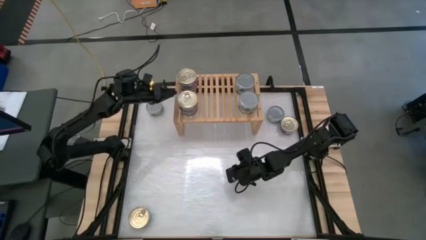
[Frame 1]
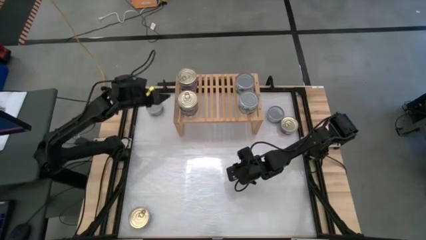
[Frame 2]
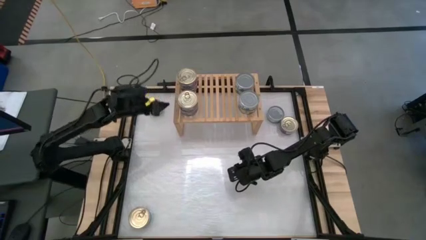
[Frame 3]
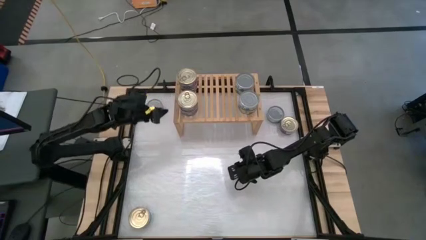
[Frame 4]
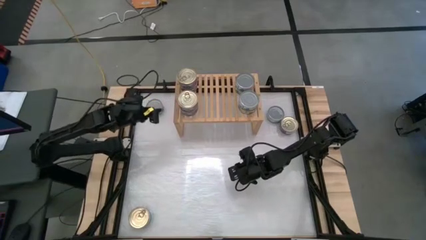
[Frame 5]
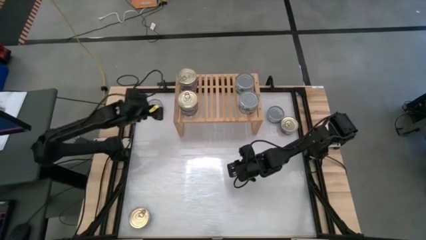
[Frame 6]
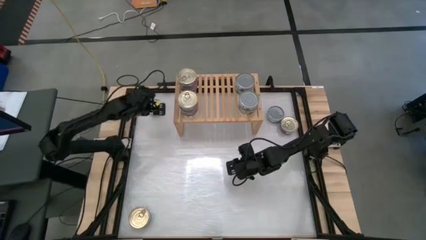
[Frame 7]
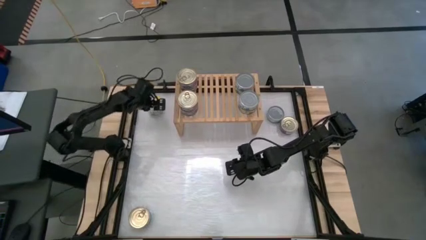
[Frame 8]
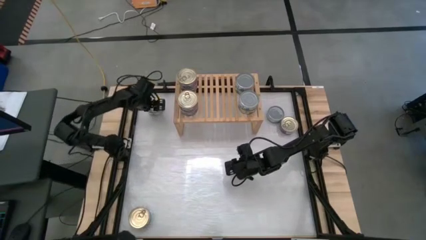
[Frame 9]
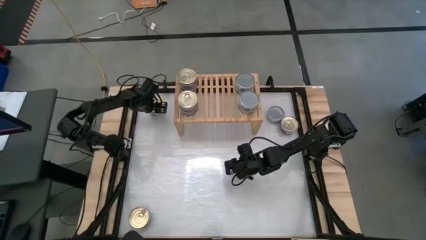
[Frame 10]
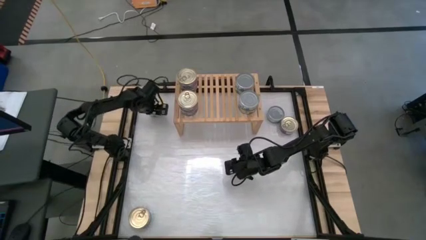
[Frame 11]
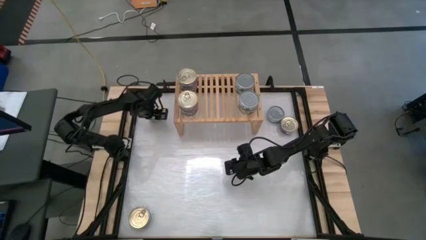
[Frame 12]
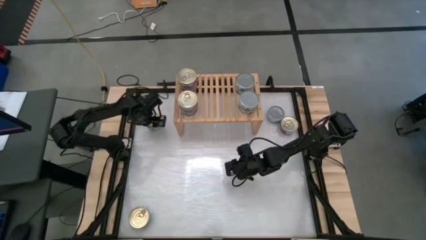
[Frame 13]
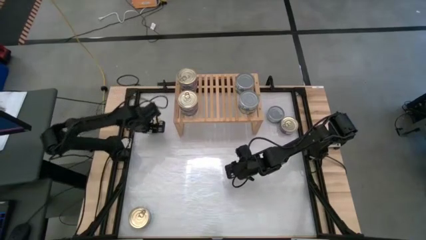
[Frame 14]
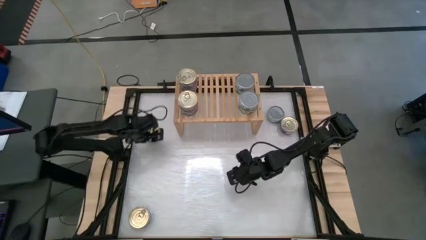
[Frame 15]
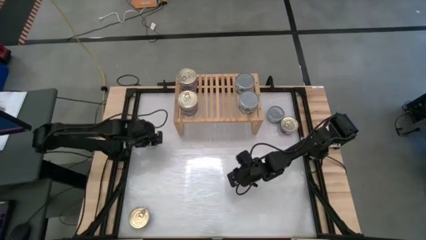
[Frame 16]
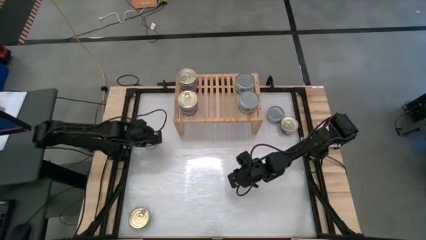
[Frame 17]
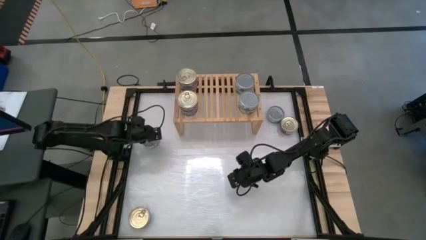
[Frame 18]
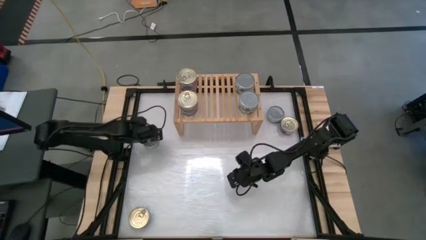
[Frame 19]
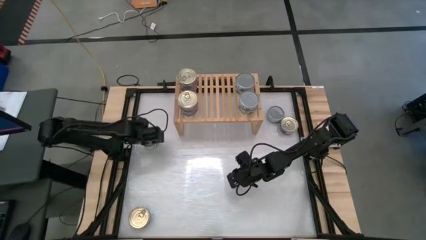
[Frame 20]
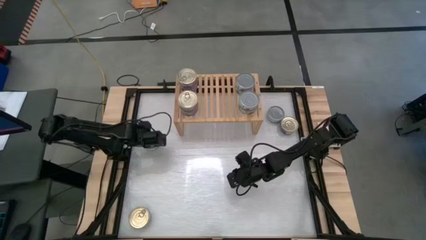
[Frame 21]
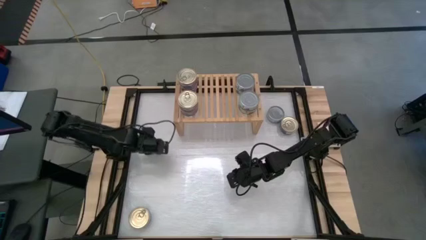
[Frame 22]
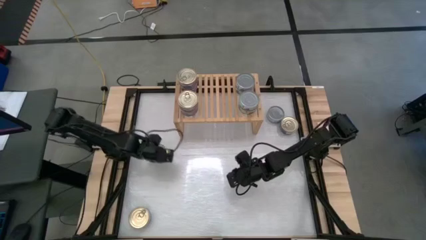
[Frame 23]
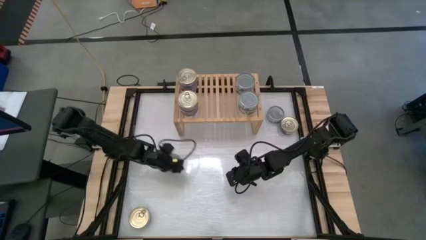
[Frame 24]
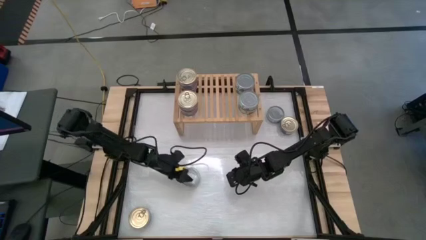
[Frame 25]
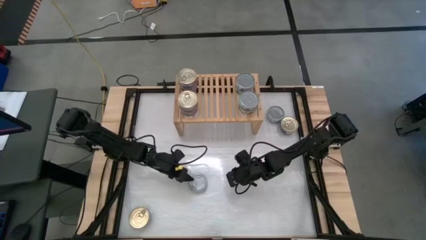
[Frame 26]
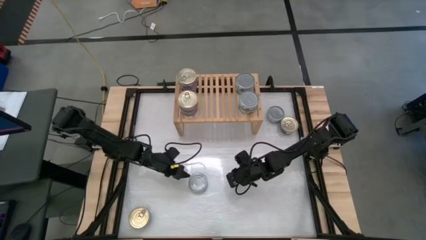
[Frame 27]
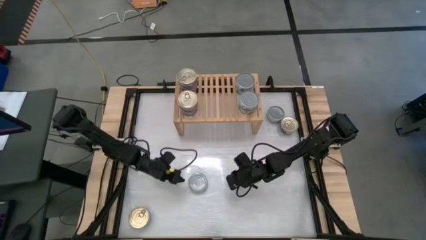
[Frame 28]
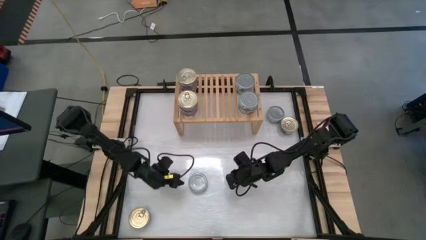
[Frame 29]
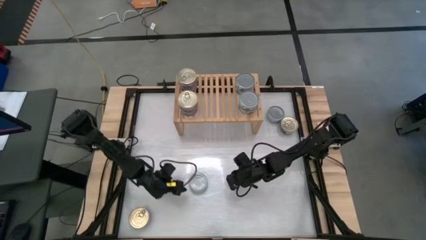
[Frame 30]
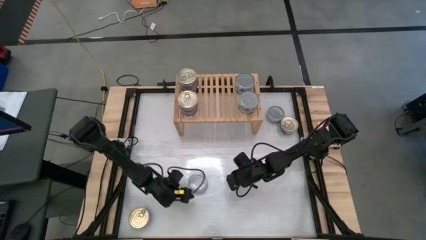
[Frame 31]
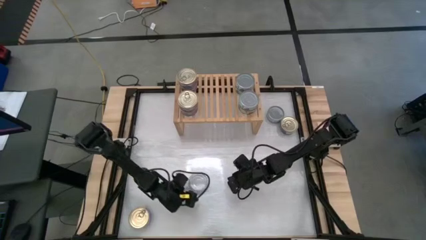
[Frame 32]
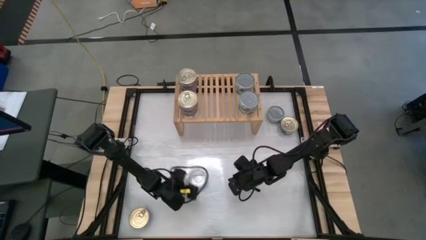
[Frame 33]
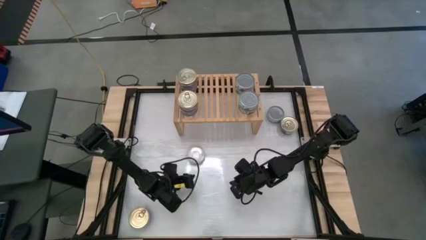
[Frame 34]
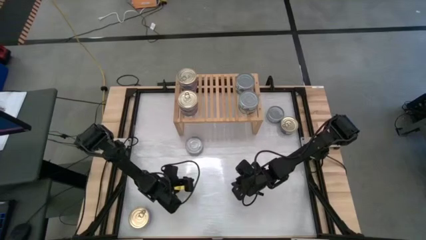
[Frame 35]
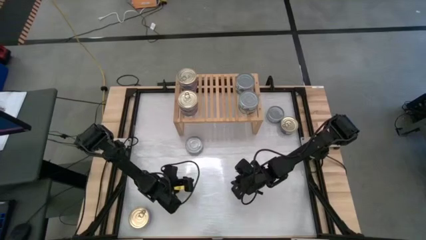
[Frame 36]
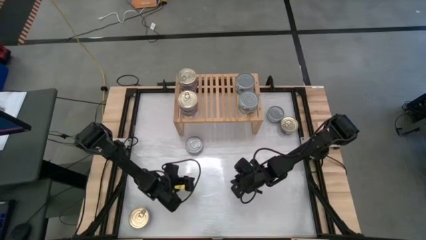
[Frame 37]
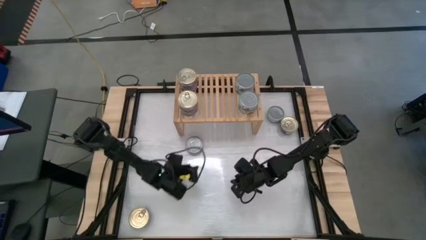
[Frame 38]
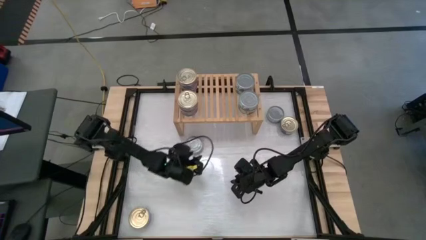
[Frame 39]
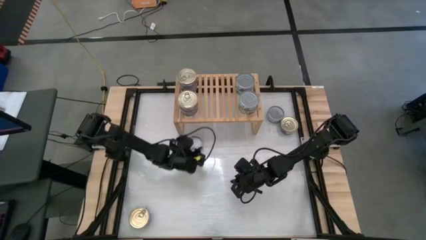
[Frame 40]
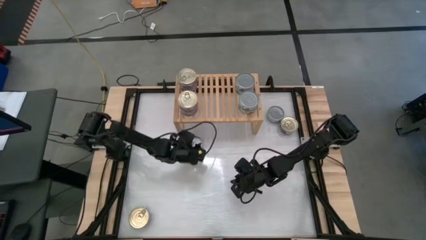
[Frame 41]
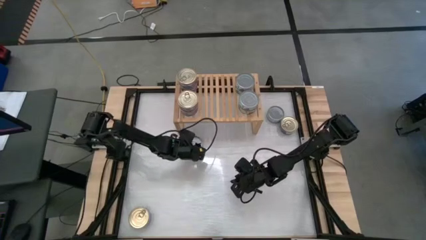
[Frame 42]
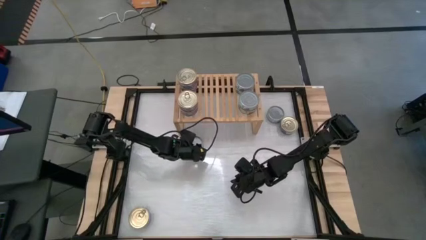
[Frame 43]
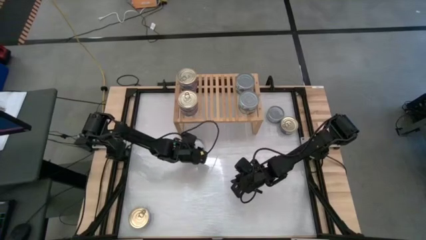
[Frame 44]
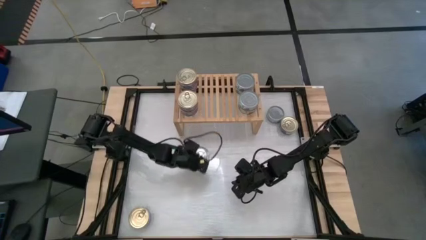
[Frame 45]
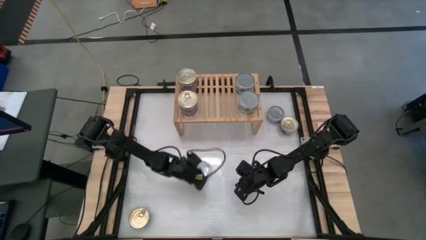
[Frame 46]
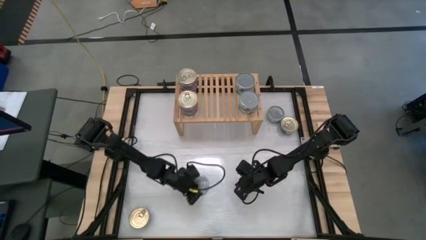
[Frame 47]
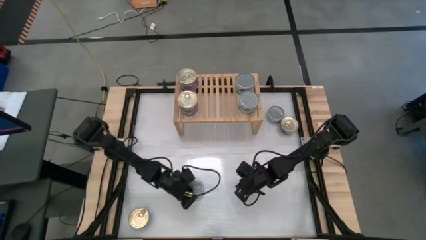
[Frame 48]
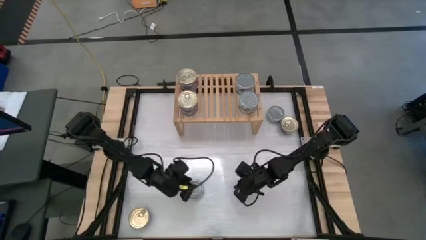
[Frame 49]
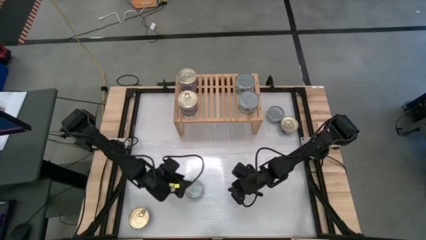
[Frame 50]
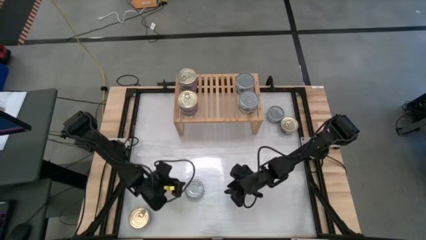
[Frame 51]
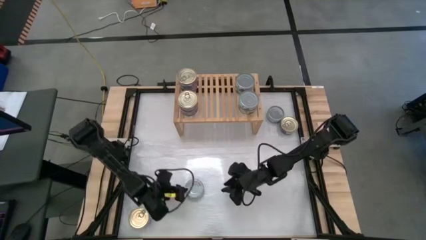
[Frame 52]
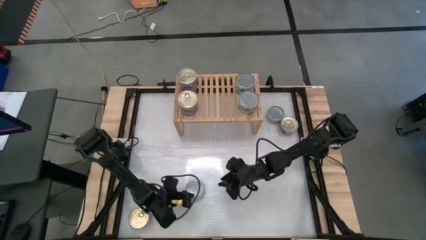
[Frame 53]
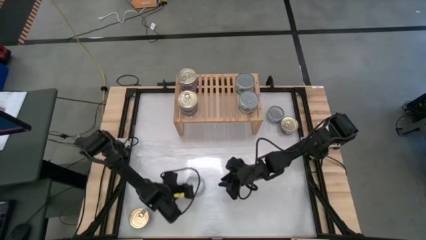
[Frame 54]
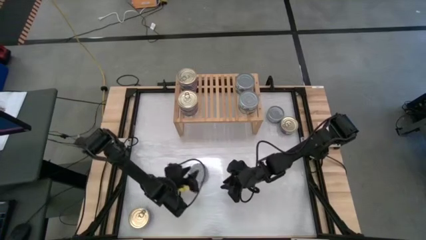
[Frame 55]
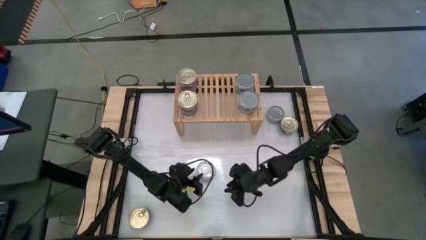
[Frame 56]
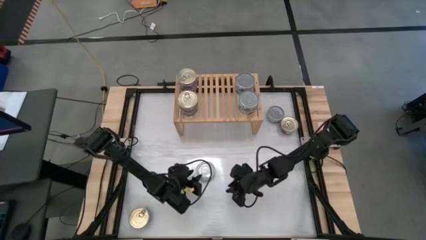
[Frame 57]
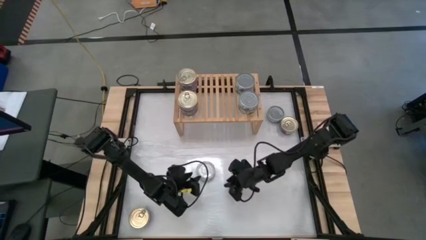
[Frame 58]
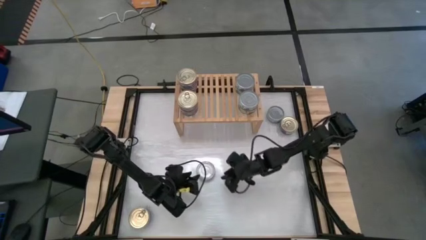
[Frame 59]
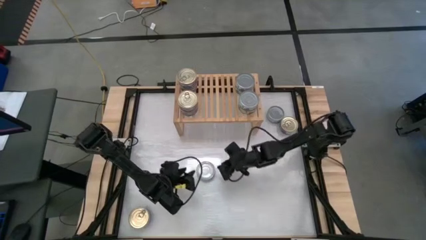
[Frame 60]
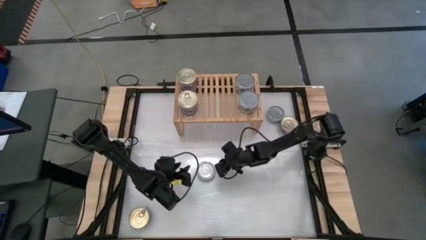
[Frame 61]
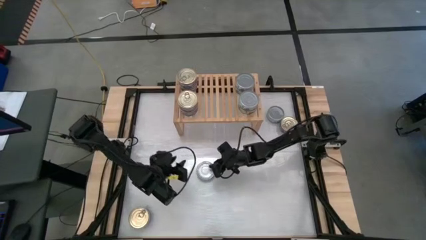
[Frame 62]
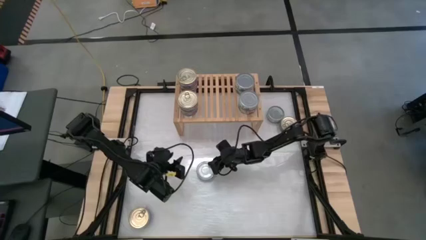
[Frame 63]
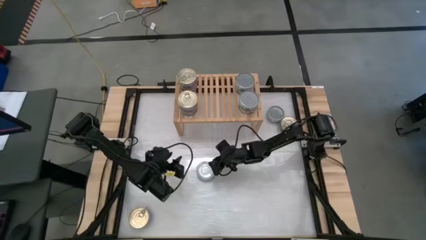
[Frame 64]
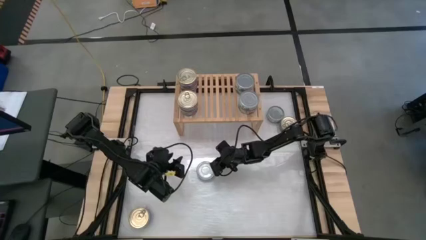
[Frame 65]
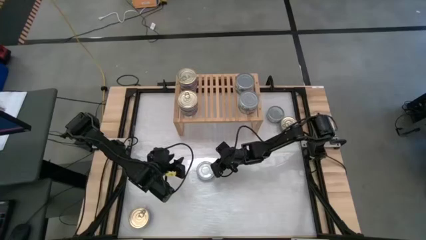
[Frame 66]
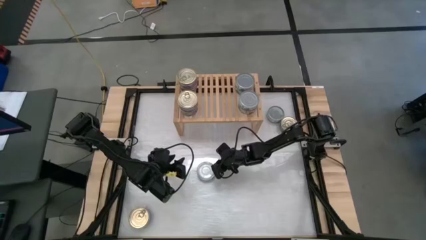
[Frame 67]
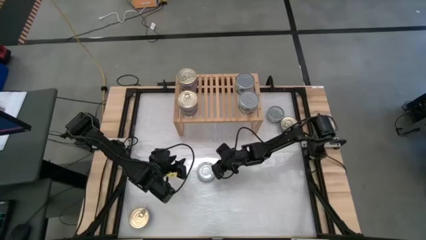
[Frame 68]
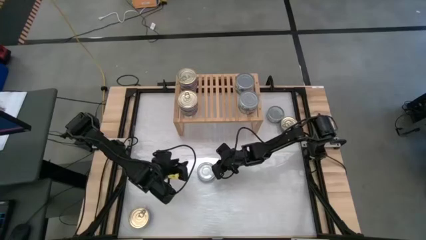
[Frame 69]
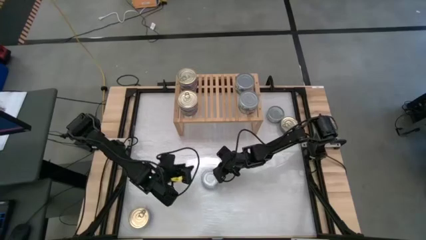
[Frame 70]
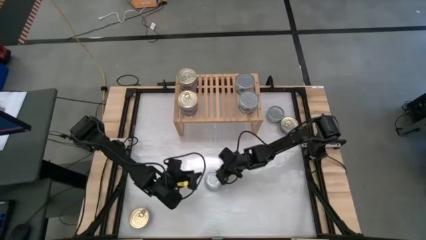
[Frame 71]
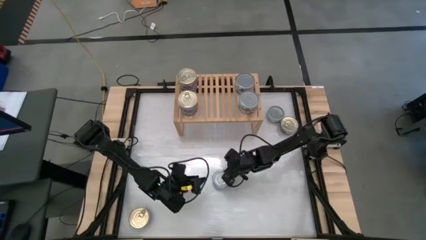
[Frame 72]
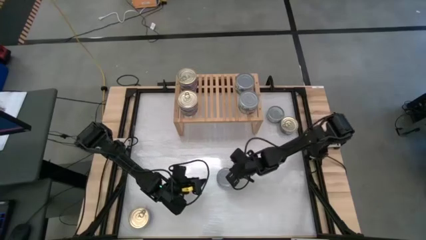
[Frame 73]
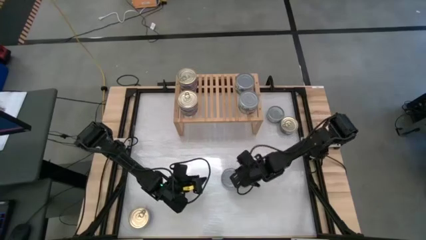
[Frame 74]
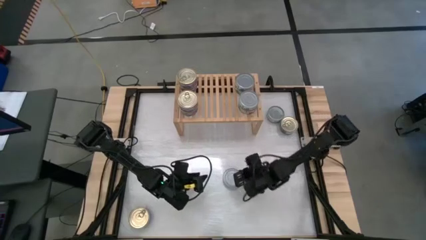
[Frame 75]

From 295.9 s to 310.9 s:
Task: Stack canned seafood by type on shelf
Put the green tuna can on the shelf aligned with the other green tuna cans
